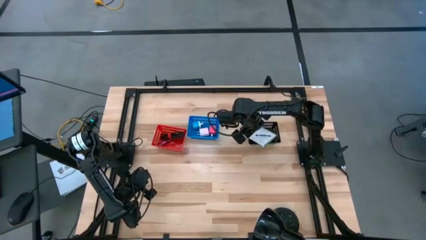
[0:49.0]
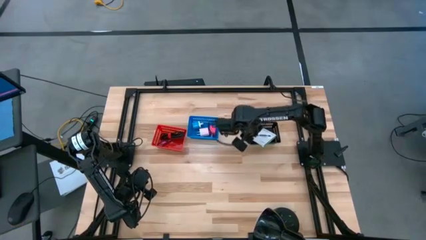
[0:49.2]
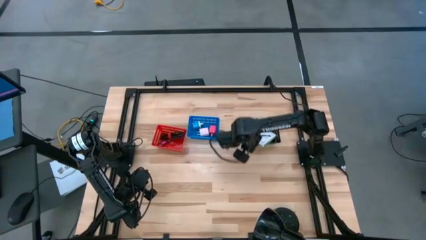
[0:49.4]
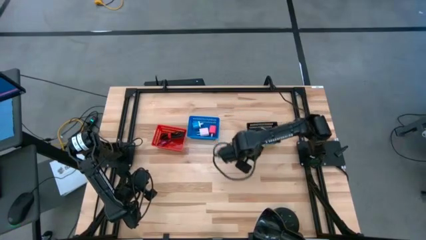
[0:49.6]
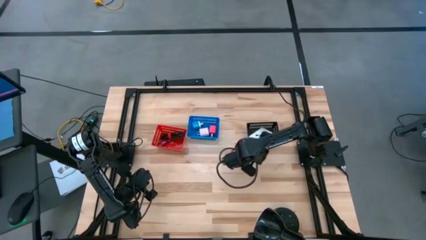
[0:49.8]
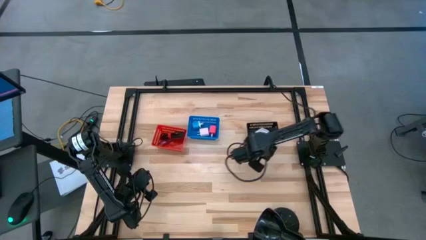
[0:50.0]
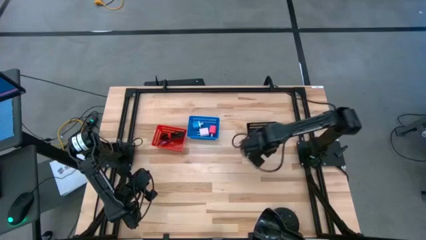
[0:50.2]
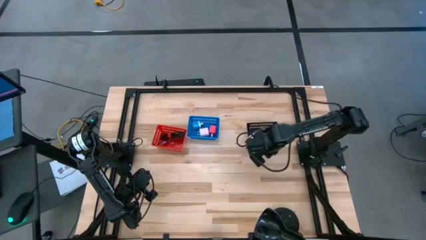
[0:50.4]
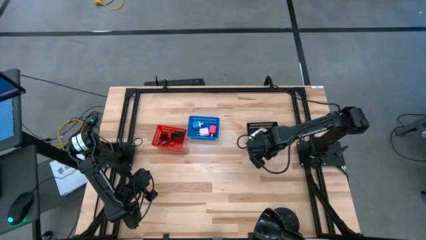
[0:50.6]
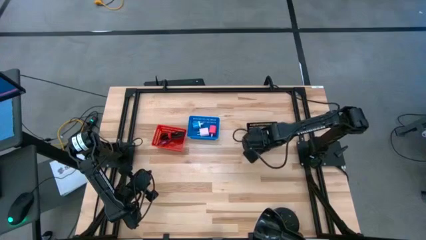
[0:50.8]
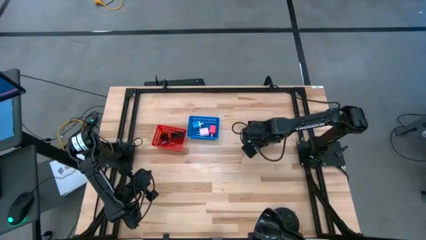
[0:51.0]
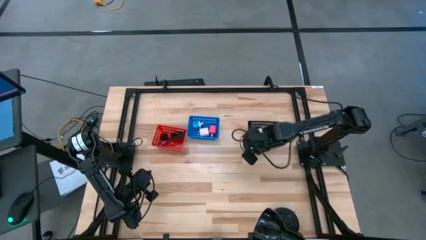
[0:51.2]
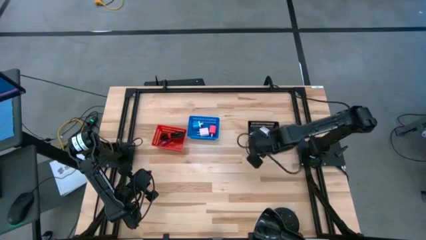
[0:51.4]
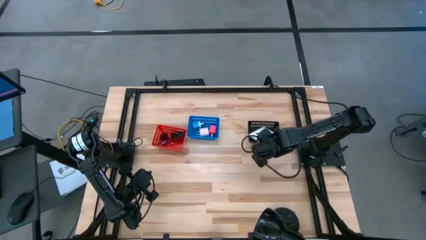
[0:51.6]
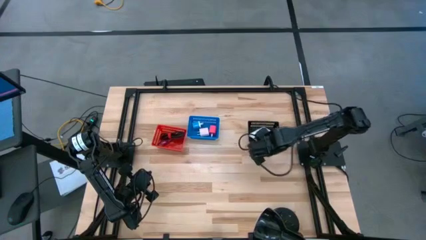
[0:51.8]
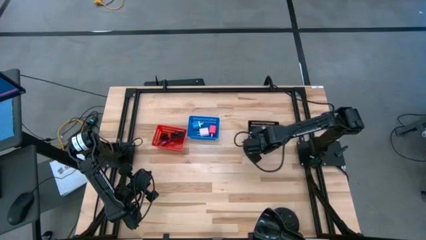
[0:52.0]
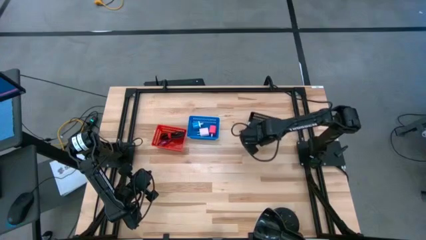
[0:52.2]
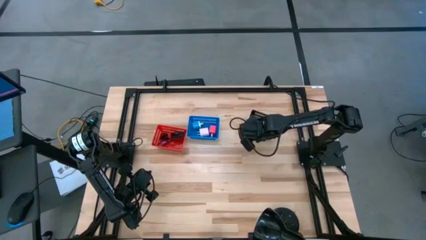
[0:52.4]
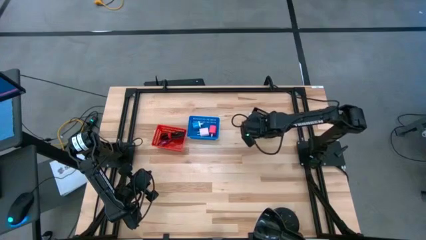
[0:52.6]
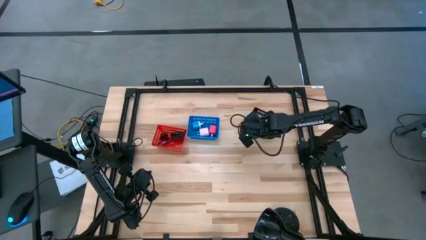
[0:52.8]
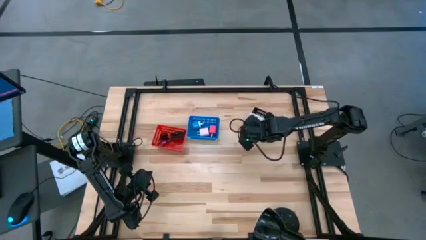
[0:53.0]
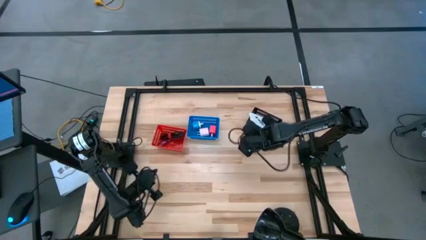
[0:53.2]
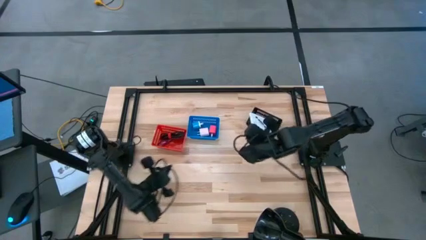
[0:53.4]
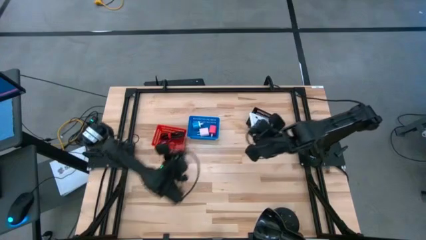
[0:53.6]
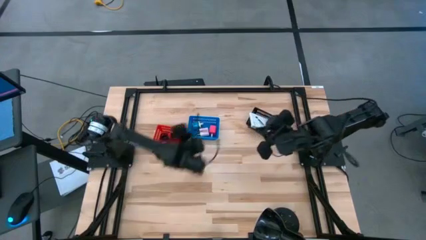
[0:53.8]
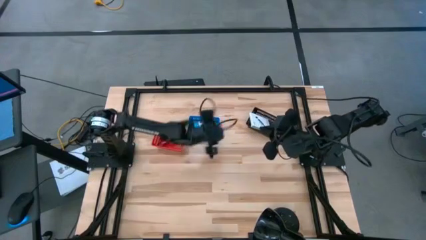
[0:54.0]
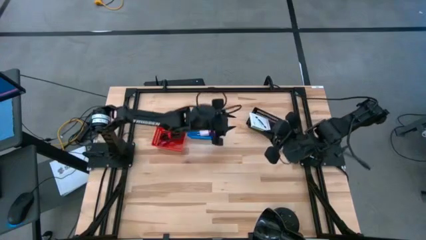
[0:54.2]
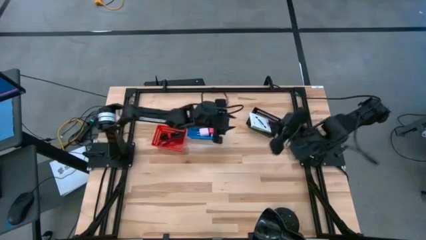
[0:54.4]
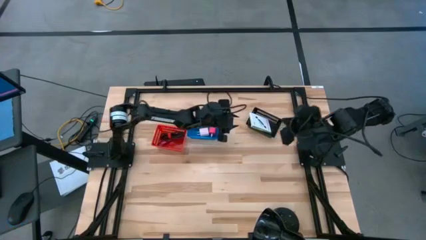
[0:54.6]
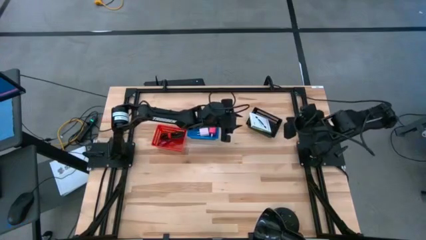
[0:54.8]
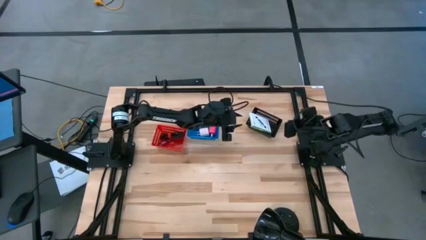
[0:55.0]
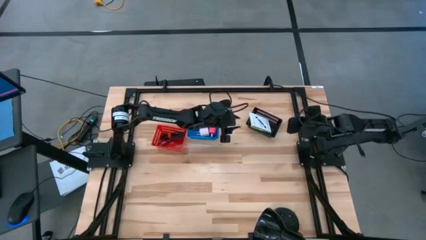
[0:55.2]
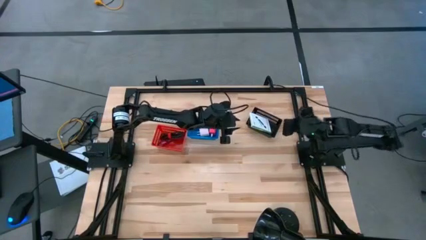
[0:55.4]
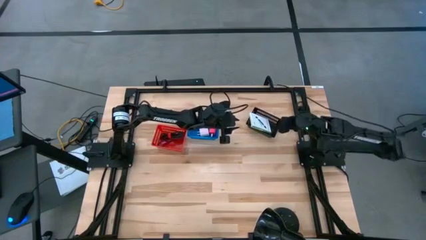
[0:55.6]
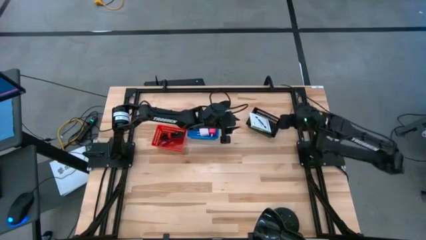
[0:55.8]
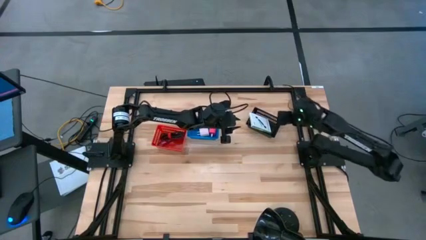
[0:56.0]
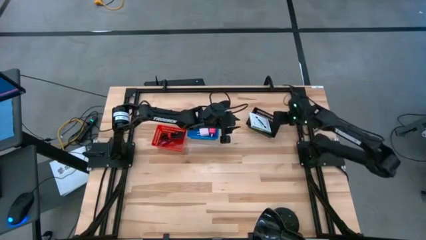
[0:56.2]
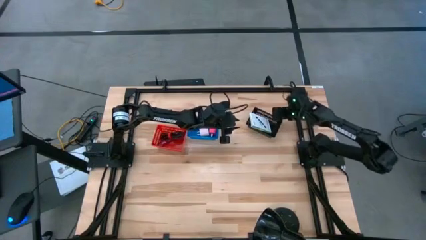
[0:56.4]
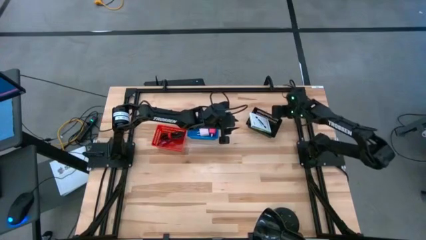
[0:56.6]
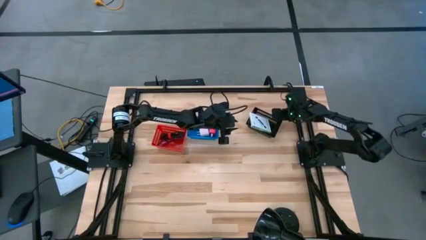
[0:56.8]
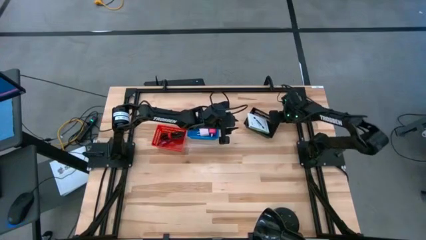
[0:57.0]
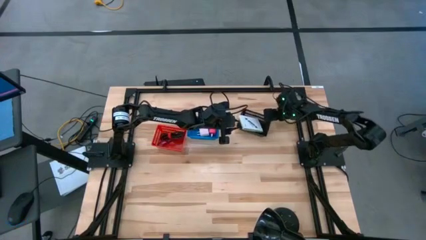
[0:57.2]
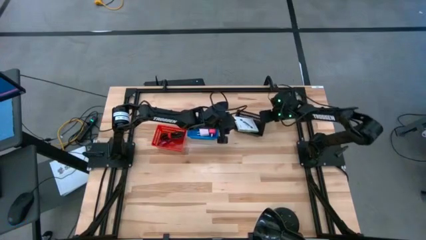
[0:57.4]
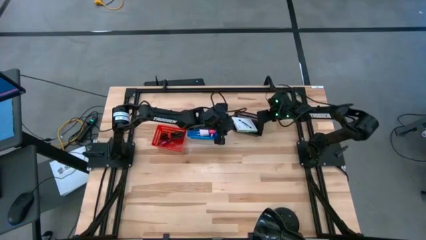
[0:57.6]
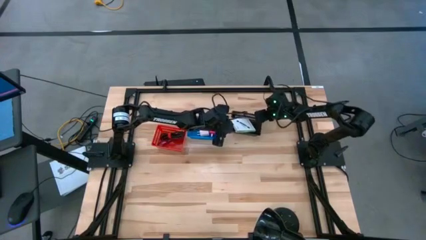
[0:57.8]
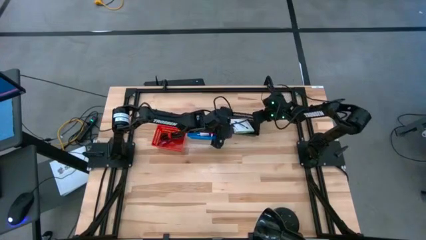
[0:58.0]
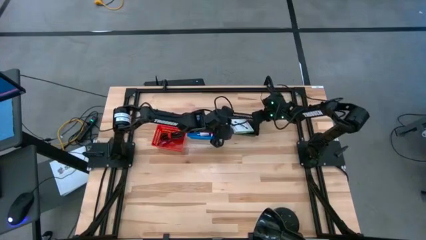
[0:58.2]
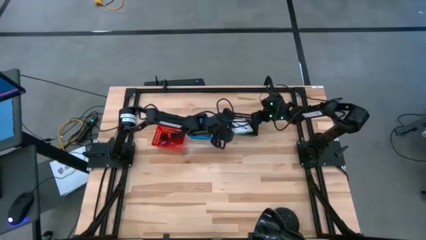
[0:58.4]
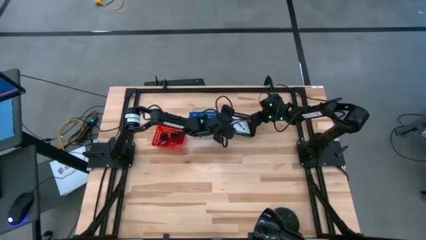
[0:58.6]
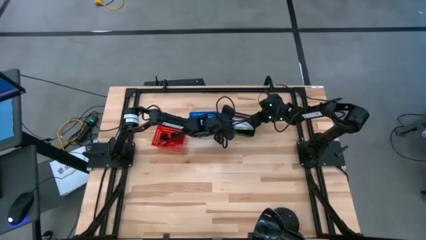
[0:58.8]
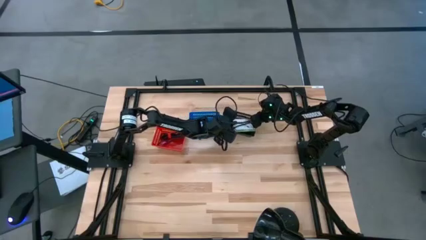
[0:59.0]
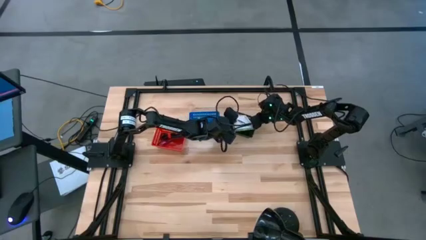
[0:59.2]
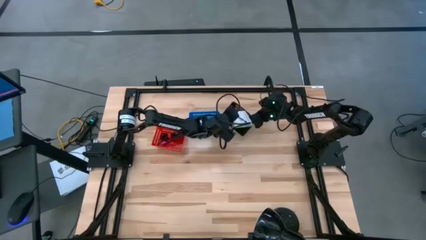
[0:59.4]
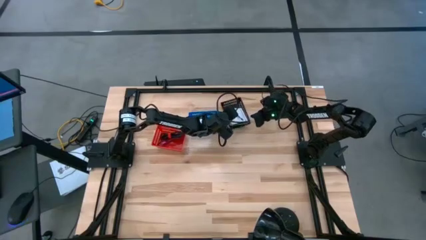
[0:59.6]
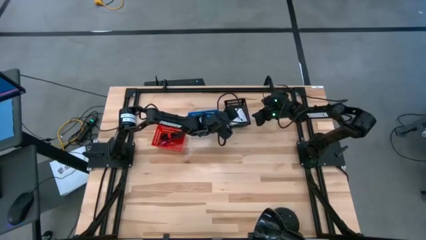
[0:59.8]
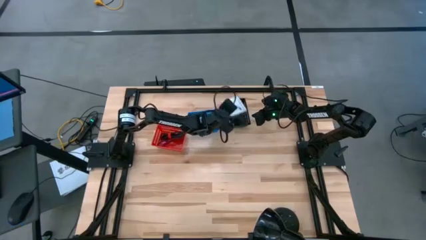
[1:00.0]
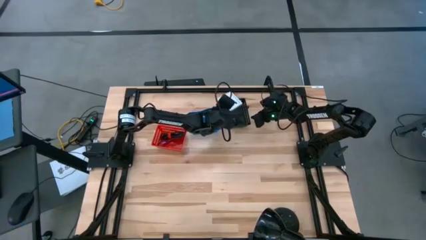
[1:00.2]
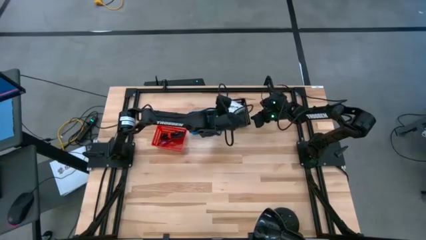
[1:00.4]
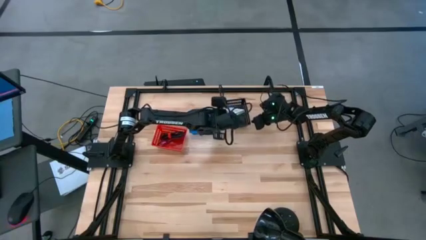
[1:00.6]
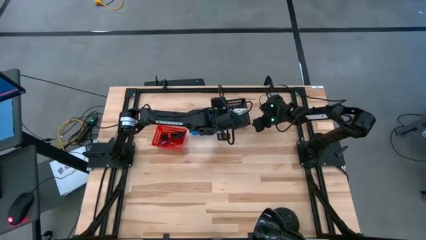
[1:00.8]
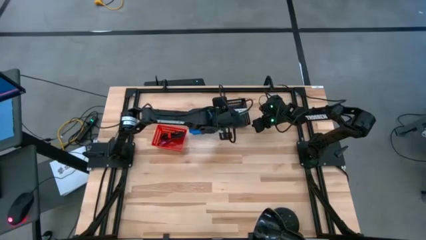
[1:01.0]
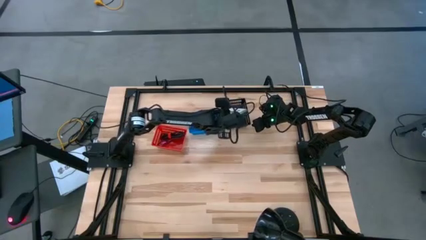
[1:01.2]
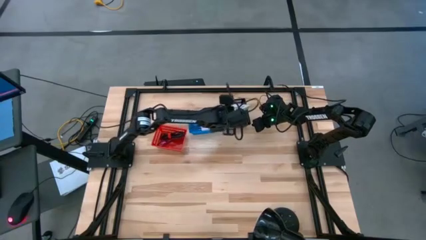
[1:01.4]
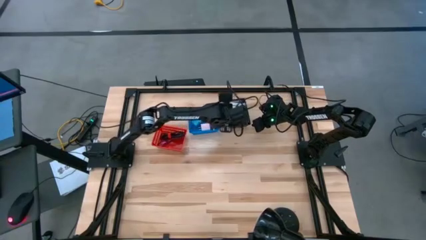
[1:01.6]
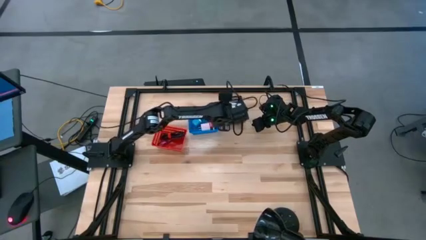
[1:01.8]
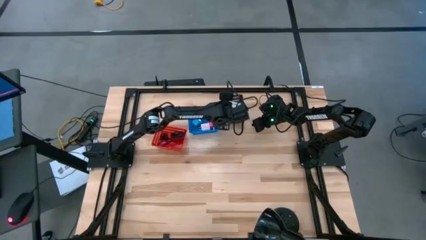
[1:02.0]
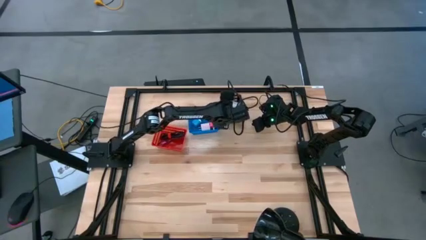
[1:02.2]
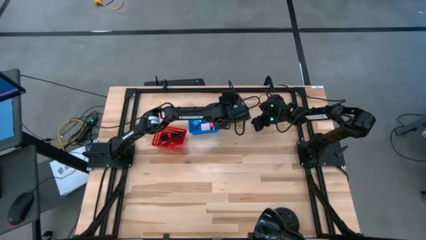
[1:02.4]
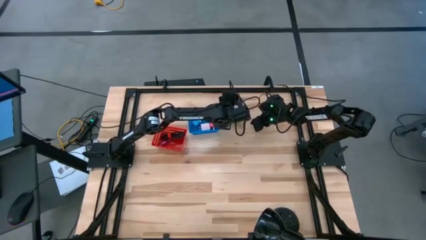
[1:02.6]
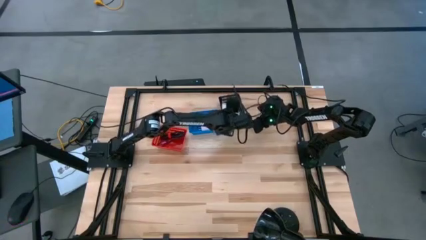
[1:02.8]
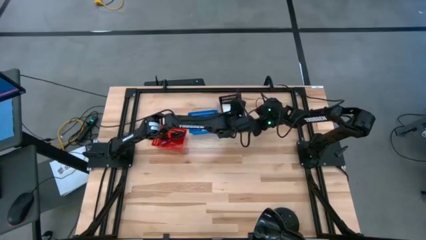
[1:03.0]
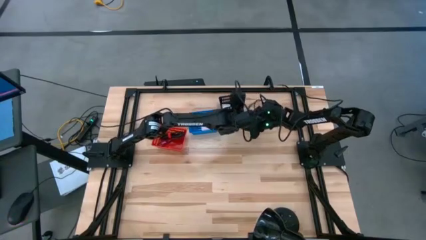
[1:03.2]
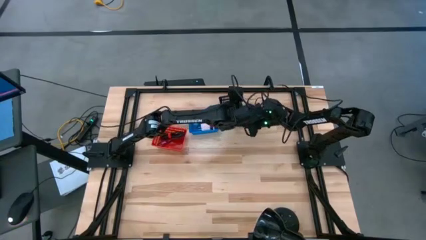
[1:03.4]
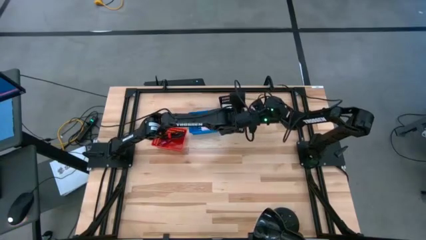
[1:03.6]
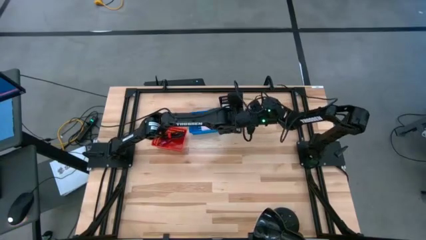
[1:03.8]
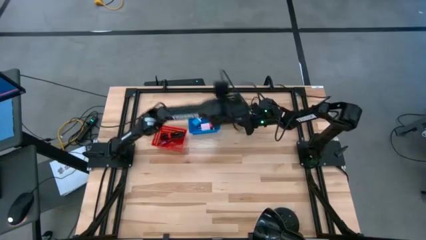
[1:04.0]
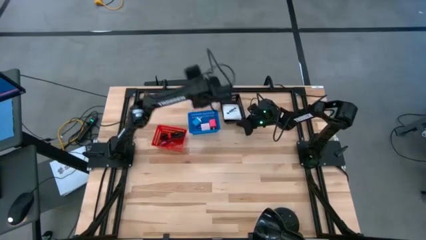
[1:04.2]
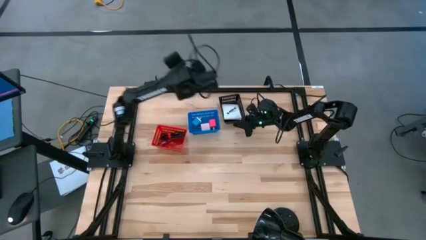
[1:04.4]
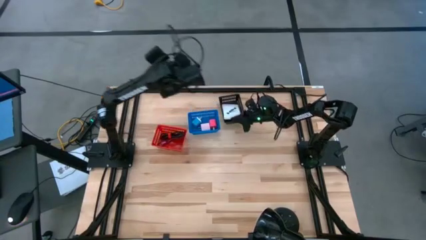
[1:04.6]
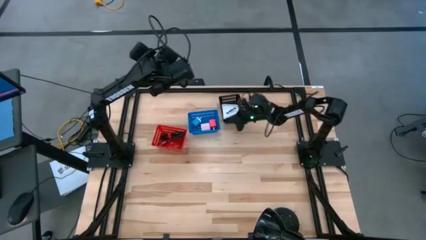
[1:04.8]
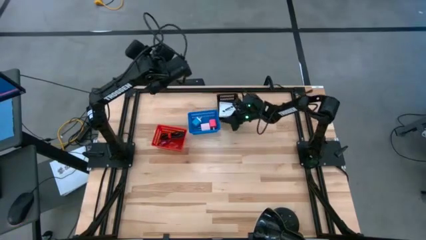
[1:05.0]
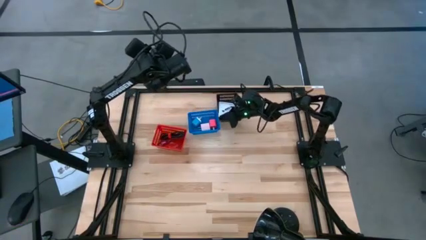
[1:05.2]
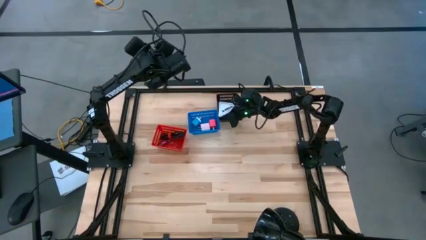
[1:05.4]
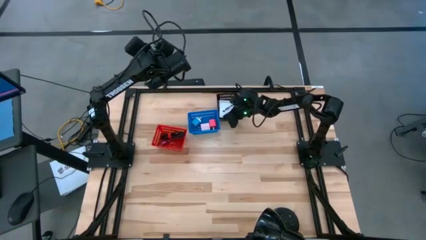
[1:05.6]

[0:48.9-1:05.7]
Task: Pick and place items into bin
Adjust the card reader box in the black bin
